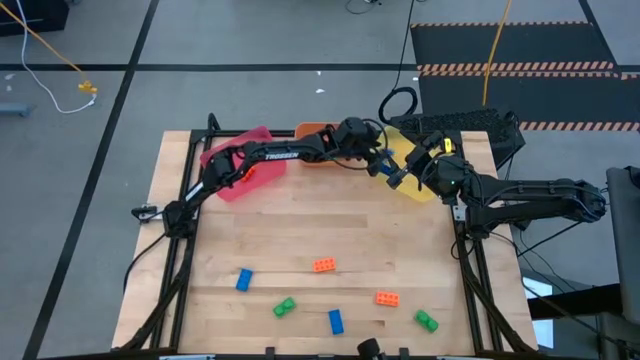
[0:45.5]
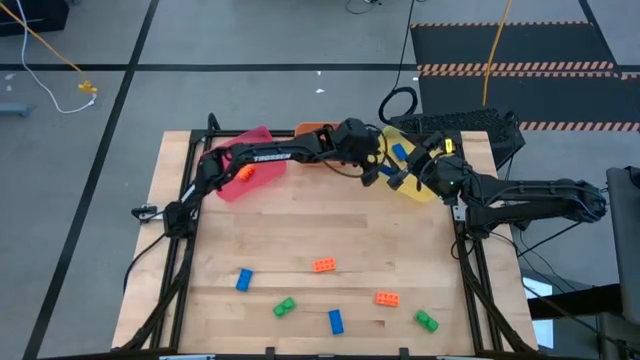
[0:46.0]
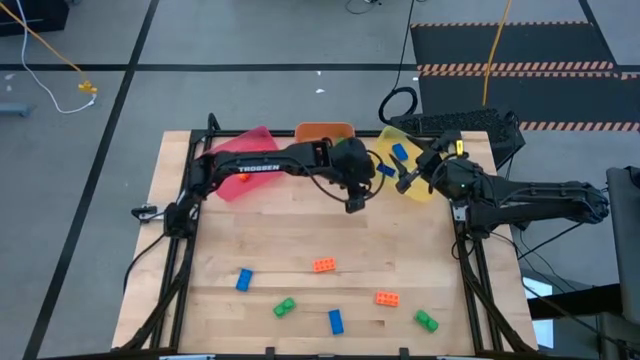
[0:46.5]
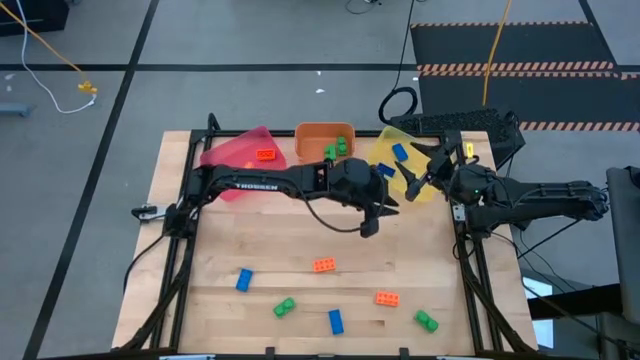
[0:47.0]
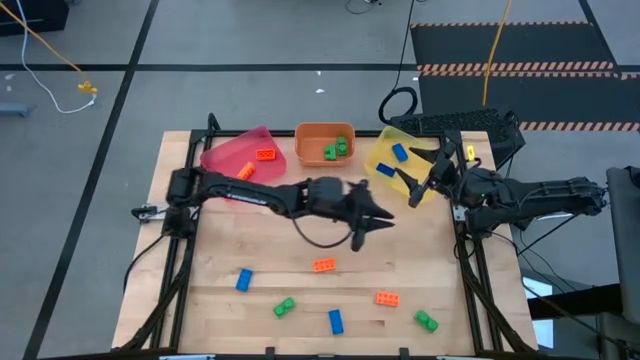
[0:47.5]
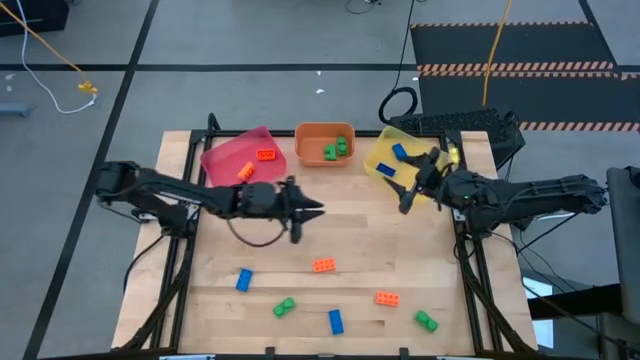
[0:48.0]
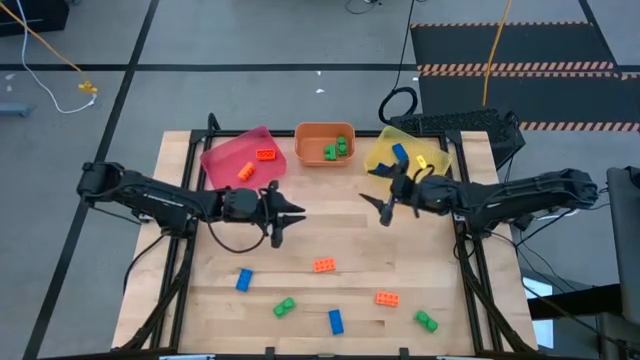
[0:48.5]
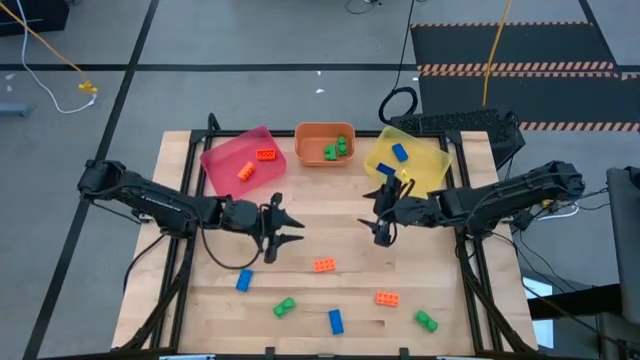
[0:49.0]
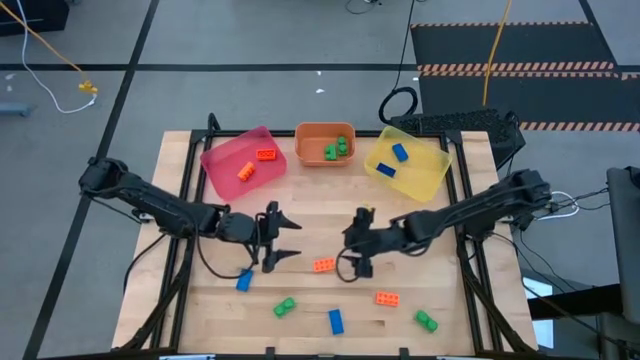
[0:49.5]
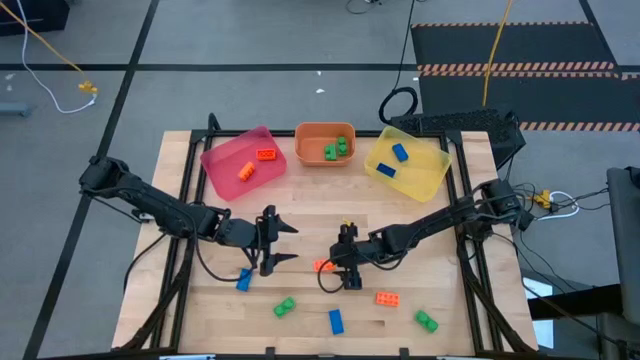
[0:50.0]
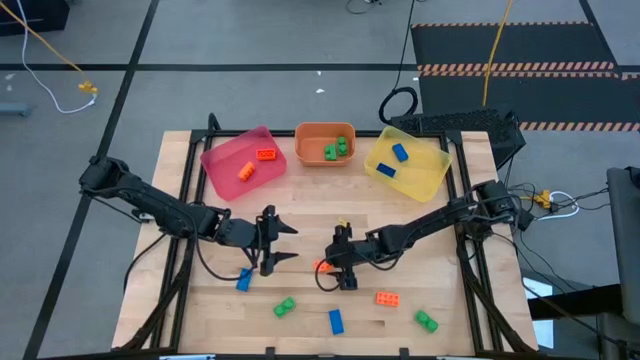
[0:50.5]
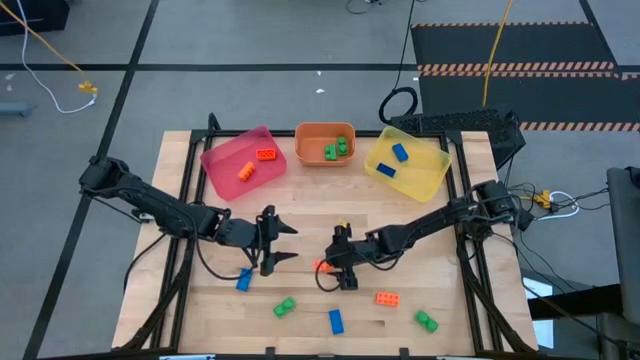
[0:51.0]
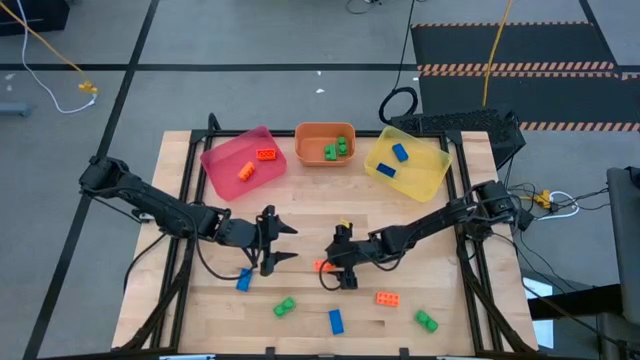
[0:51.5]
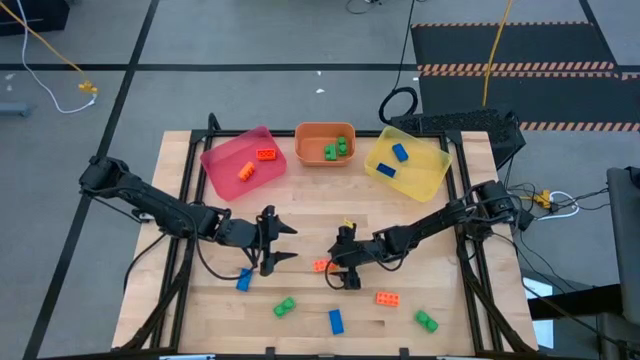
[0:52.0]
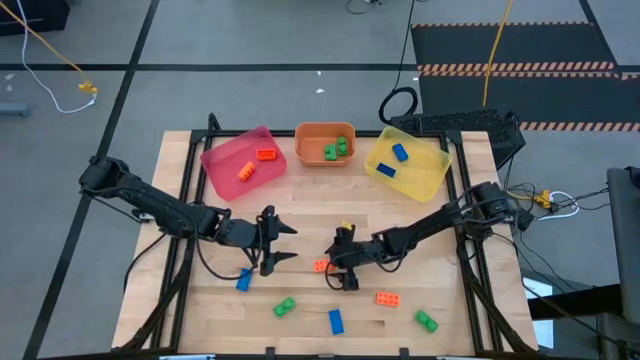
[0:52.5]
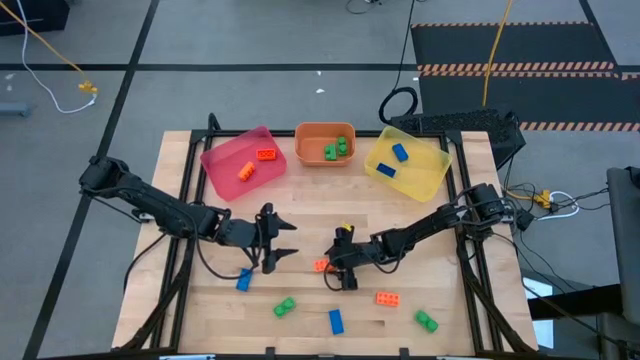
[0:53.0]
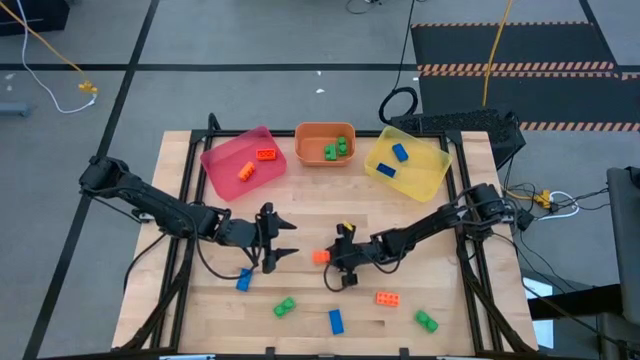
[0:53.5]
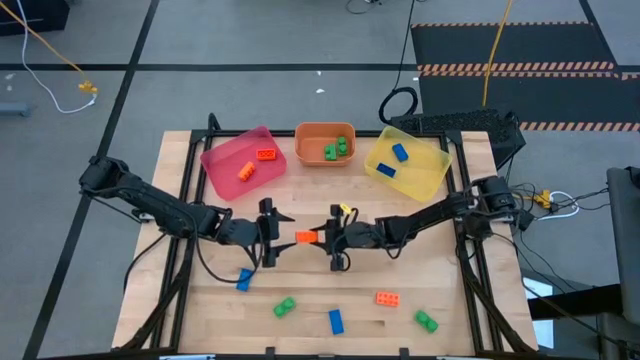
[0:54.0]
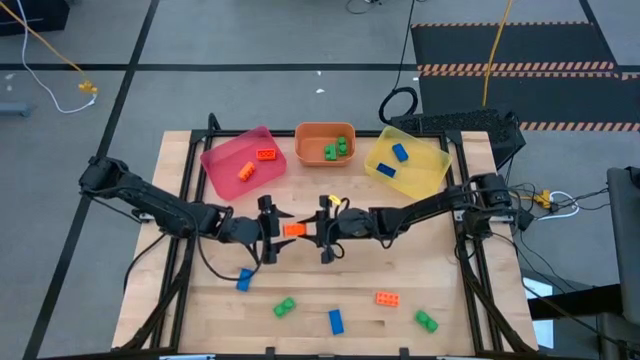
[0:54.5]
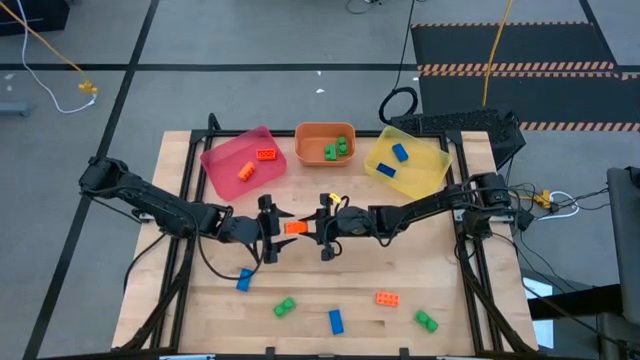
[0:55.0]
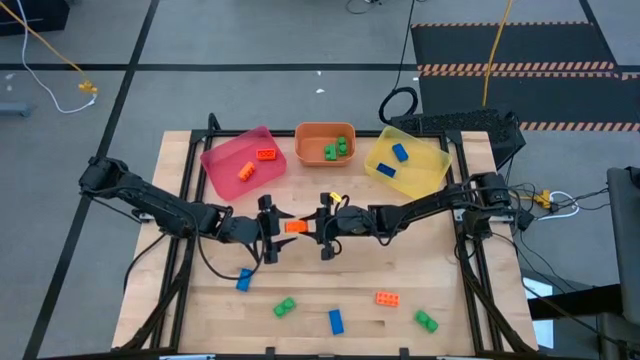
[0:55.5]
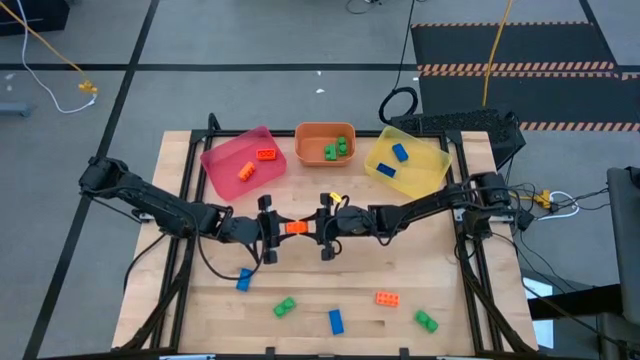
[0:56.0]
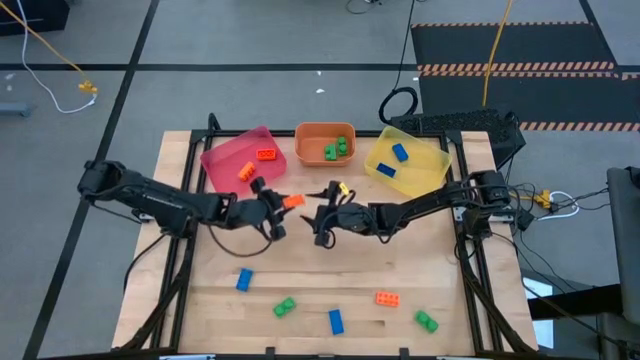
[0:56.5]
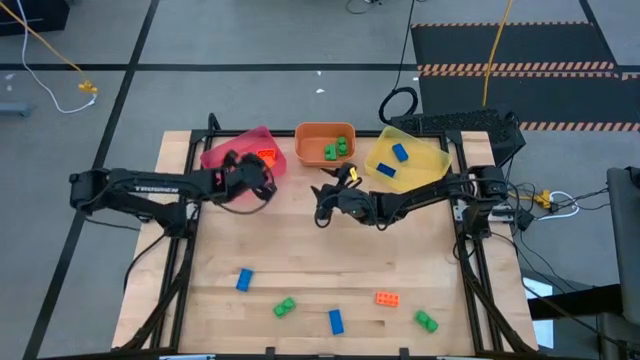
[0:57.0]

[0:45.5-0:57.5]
Task: Sort & place blocks by color
Put the orange game piece into the pink bin

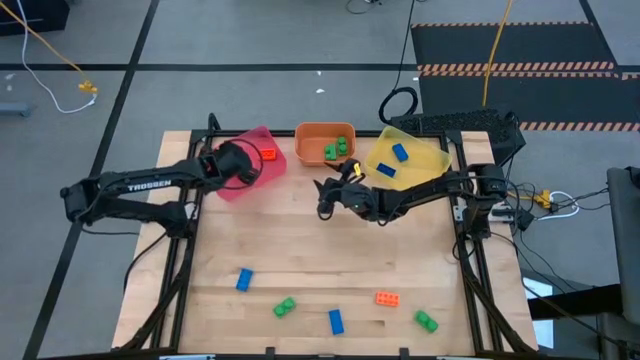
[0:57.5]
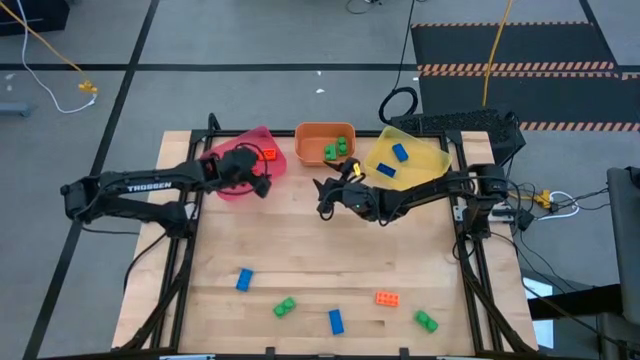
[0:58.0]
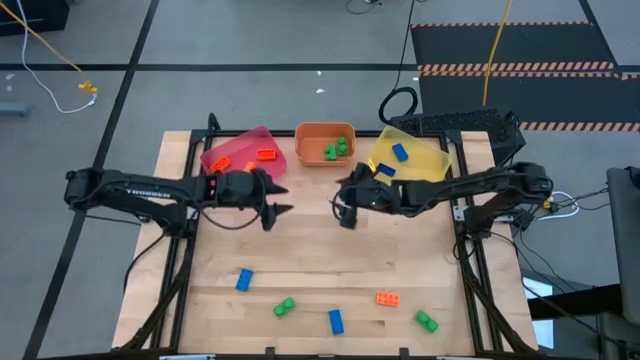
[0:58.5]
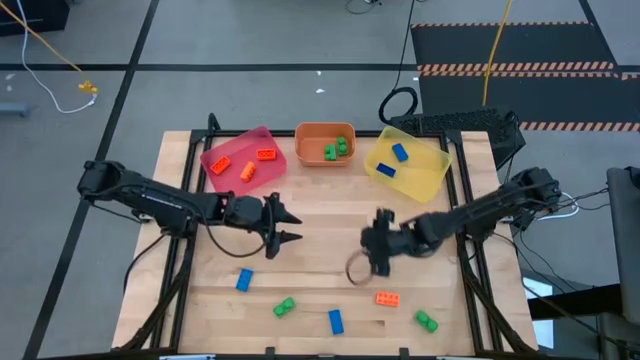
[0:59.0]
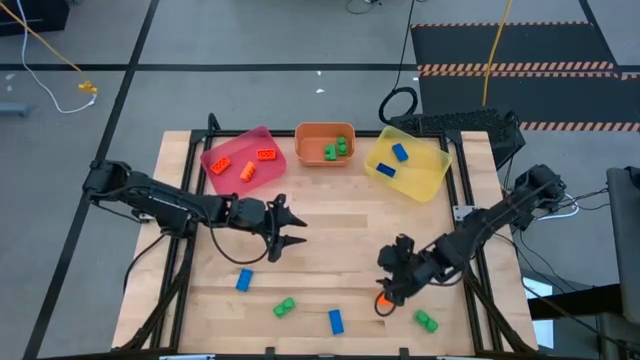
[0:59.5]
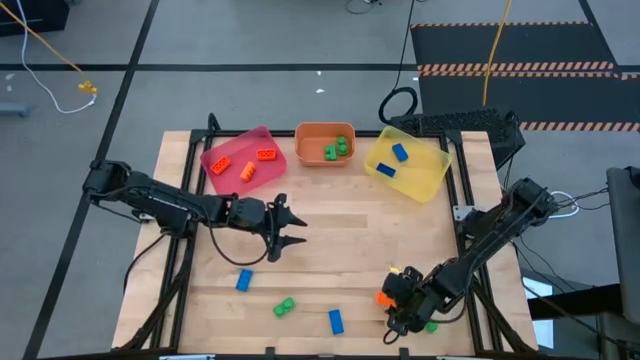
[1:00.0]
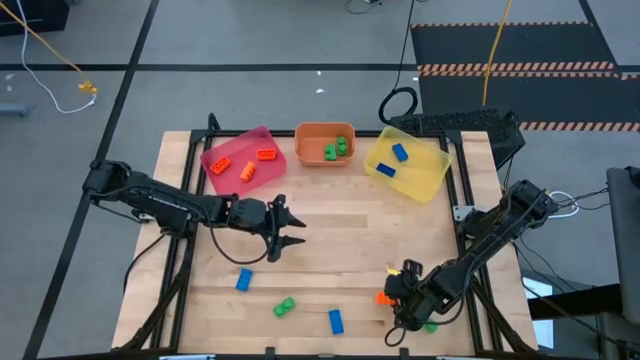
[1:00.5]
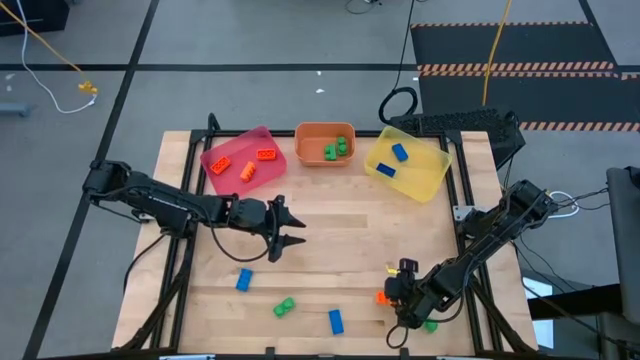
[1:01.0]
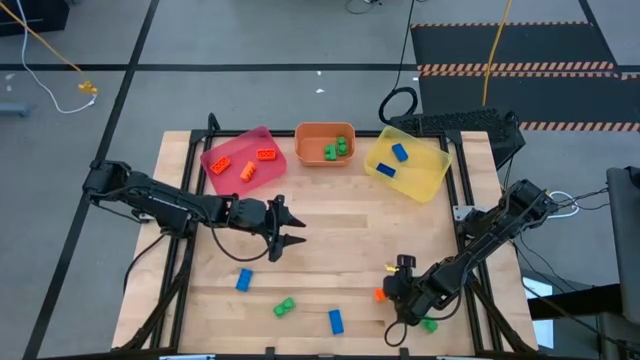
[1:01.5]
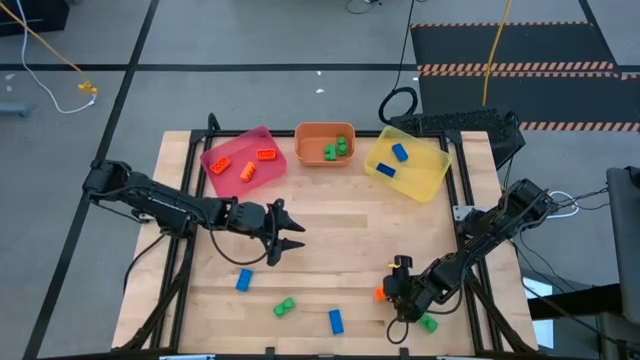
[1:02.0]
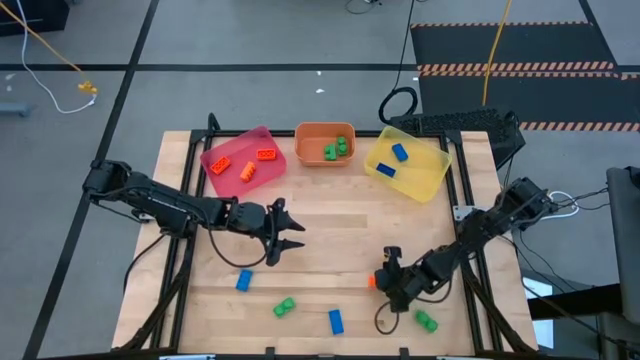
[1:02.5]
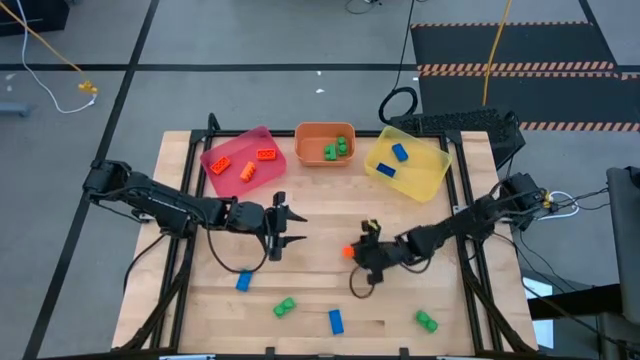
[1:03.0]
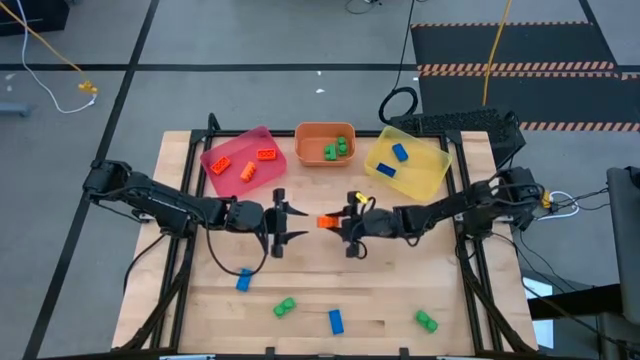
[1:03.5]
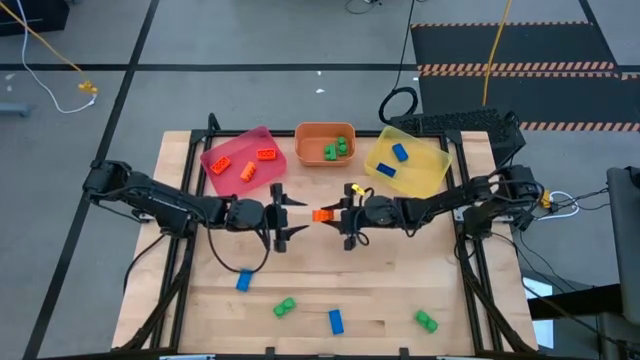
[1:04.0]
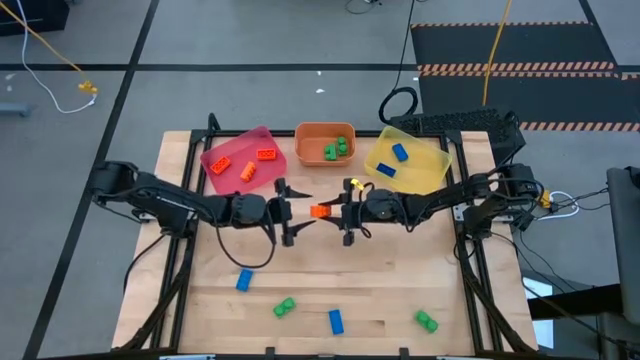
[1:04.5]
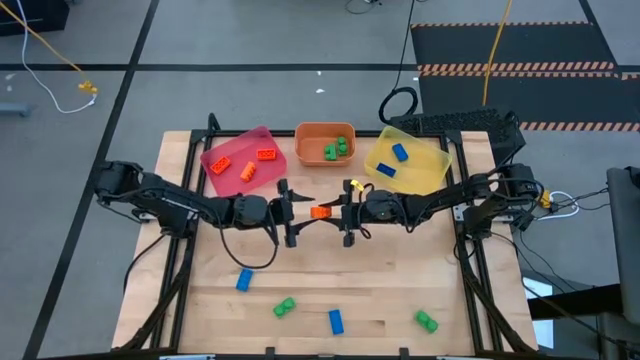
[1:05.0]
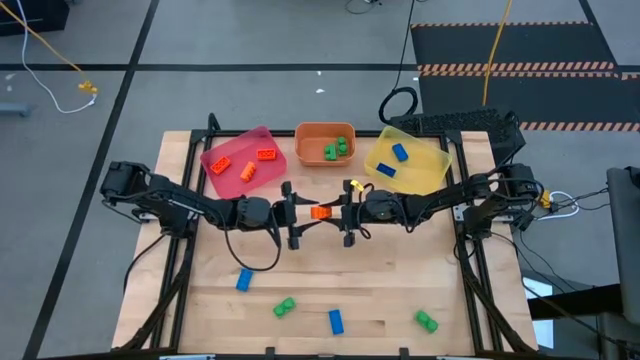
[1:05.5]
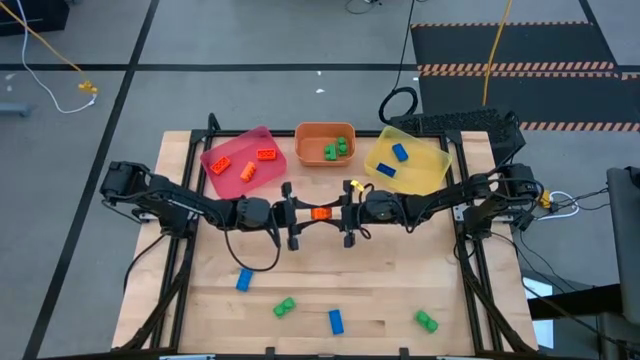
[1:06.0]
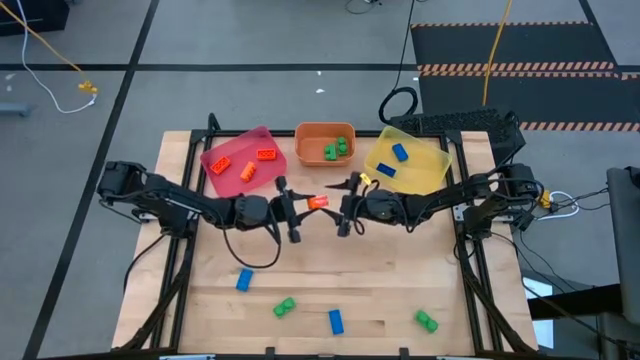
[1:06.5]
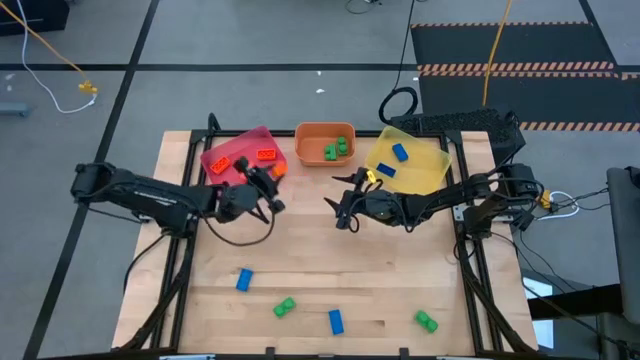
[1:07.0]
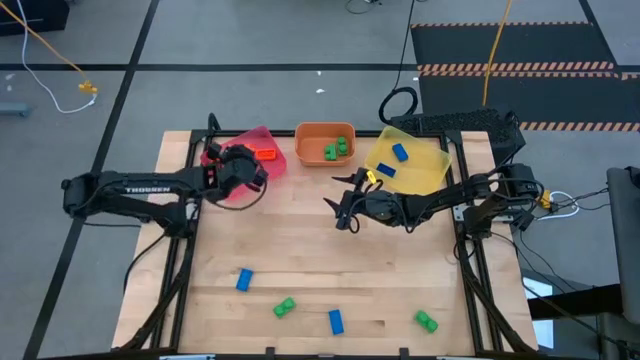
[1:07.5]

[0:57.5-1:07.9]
Put the orange game piece into the pink bin

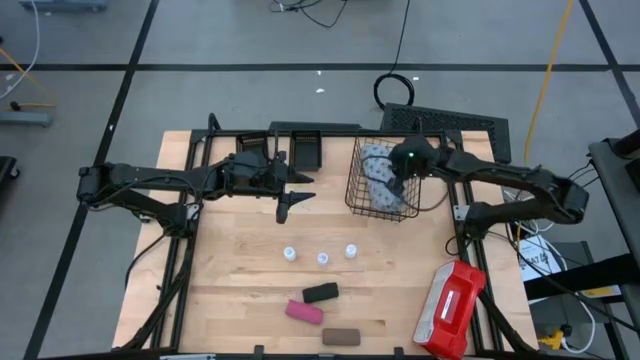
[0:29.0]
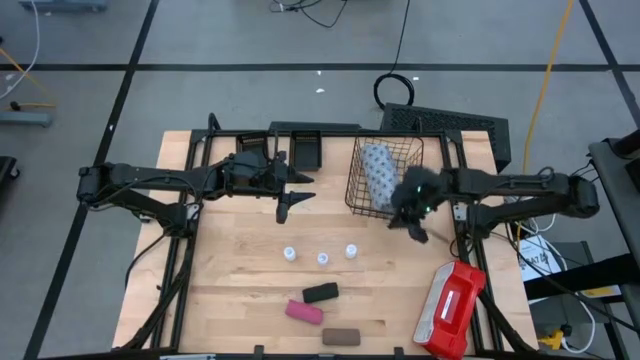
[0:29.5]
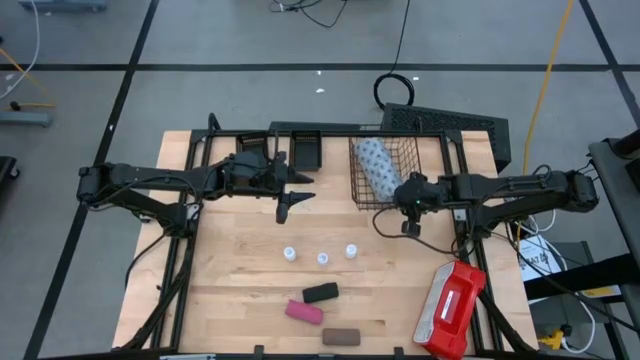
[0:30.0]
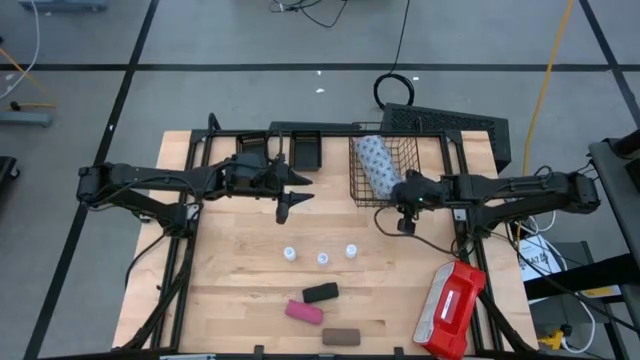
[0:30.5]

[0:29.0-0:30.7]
Task: Pick & place medical supplies in basket/bin
Adjust the black wire basket
